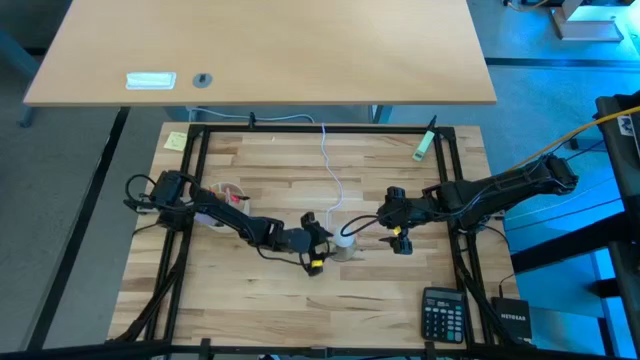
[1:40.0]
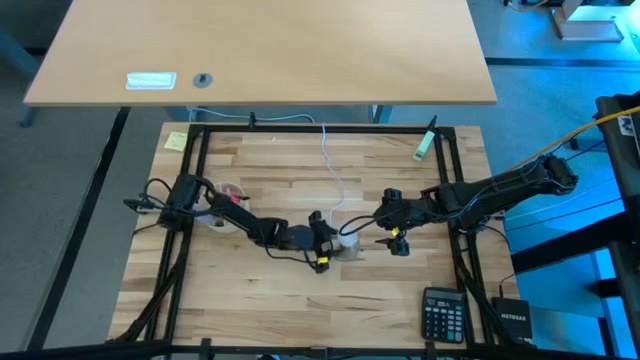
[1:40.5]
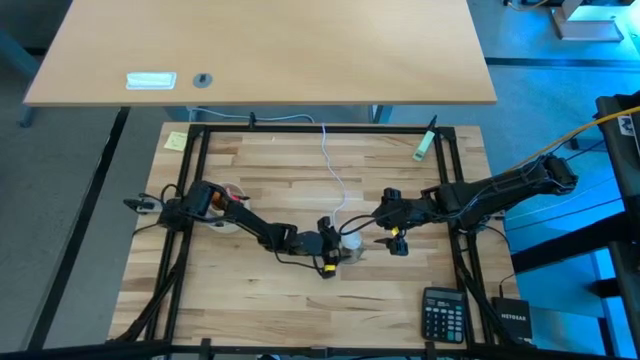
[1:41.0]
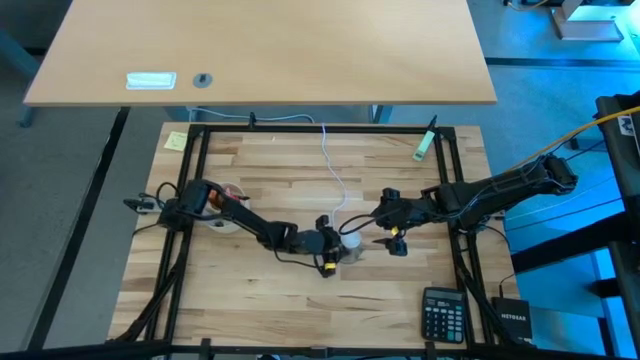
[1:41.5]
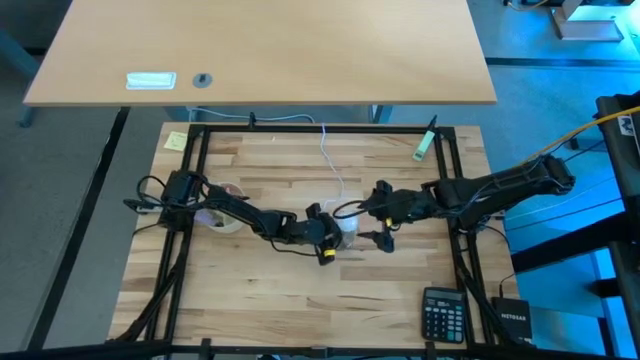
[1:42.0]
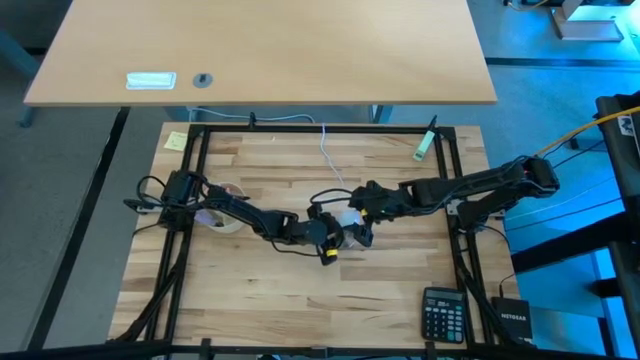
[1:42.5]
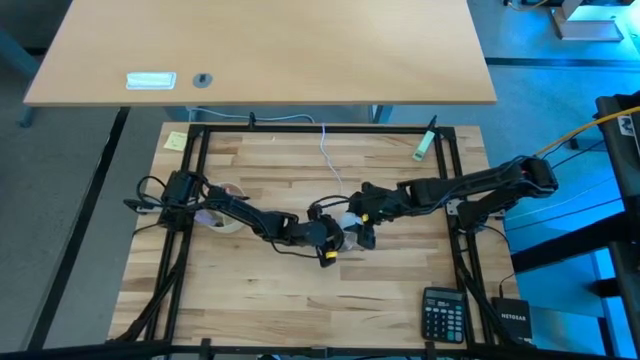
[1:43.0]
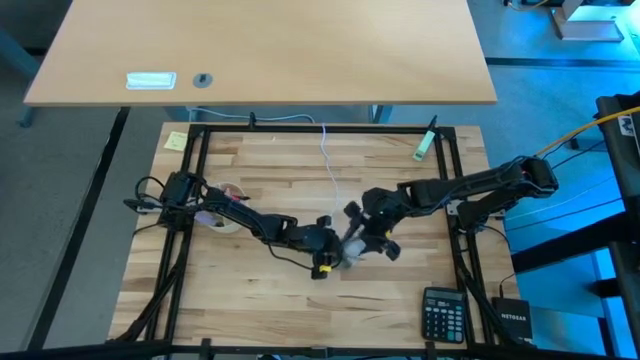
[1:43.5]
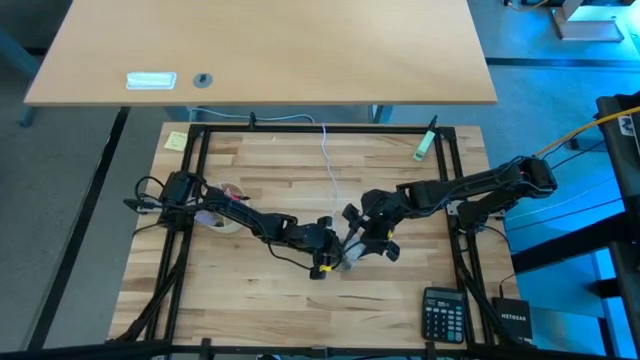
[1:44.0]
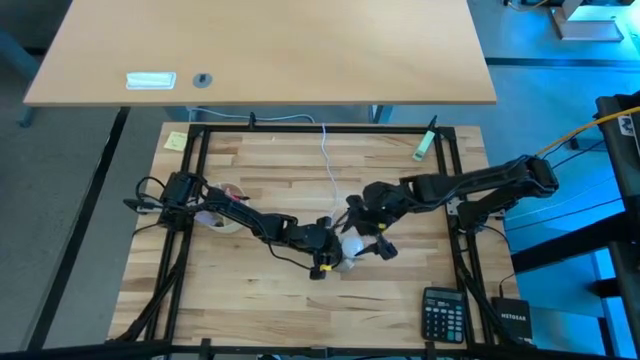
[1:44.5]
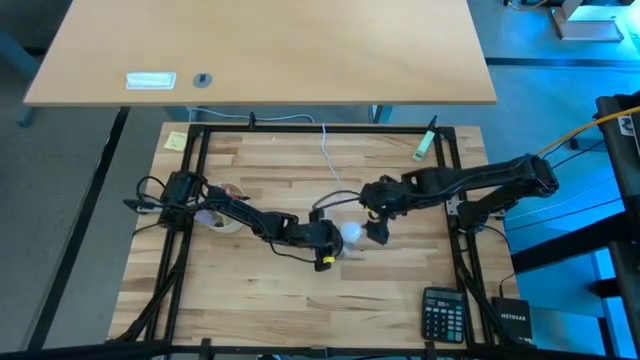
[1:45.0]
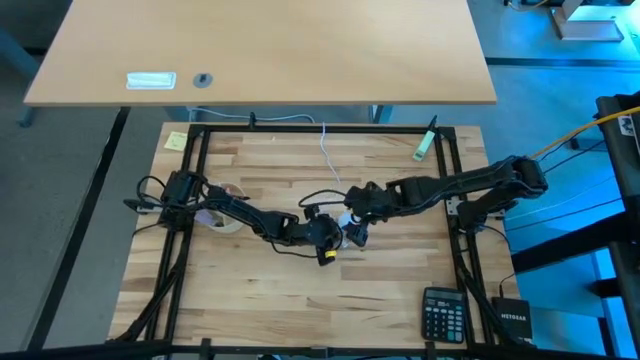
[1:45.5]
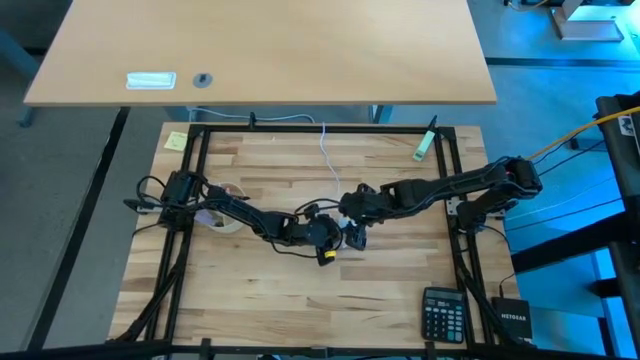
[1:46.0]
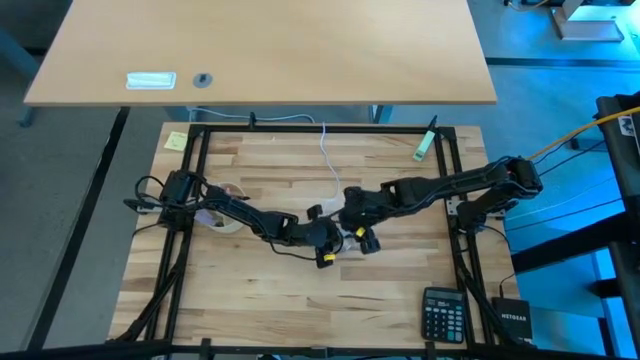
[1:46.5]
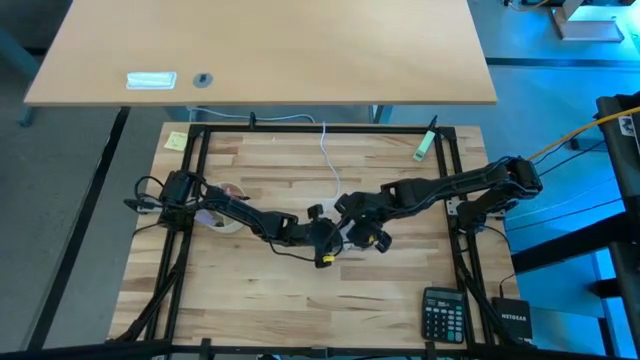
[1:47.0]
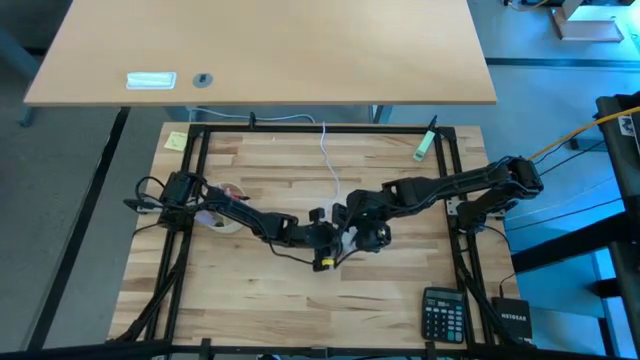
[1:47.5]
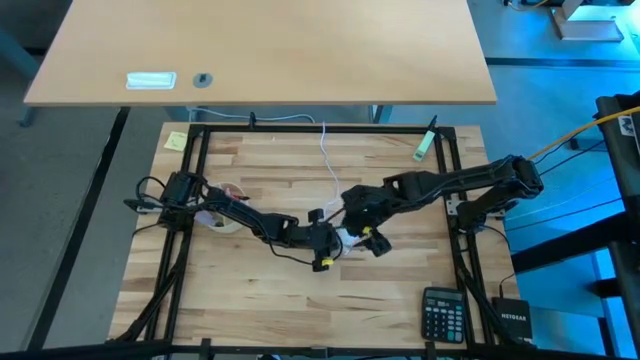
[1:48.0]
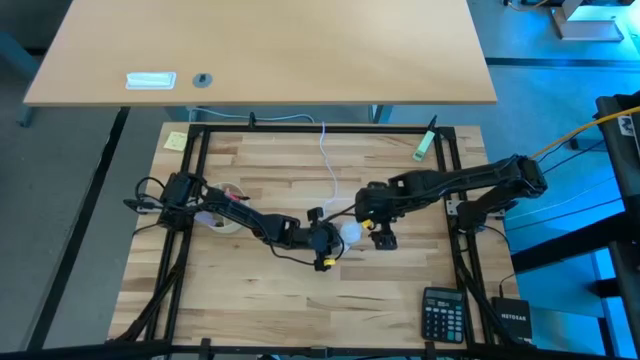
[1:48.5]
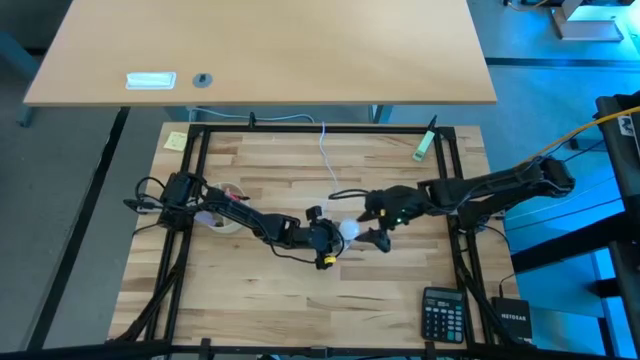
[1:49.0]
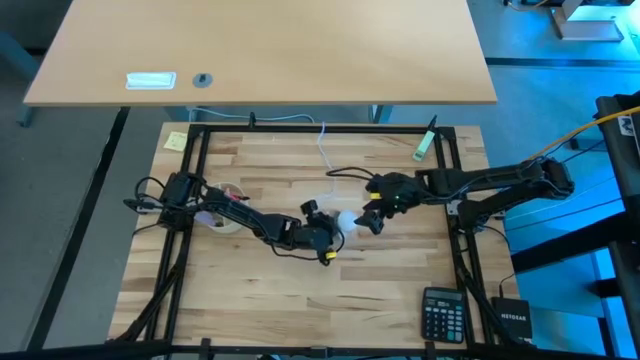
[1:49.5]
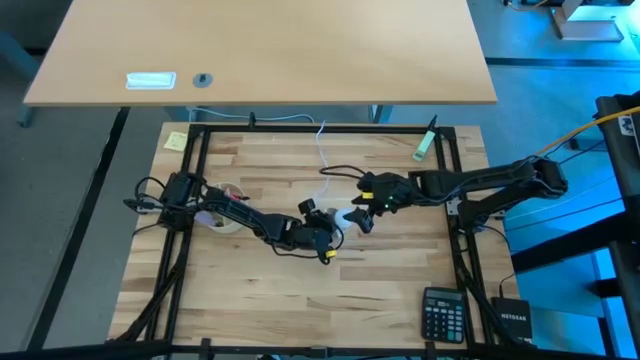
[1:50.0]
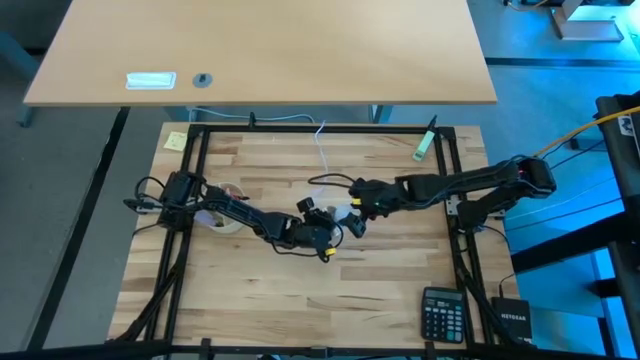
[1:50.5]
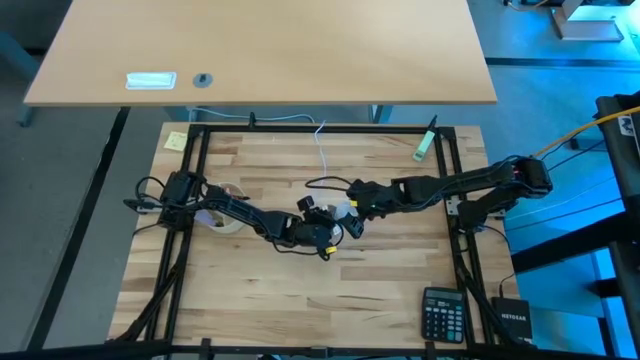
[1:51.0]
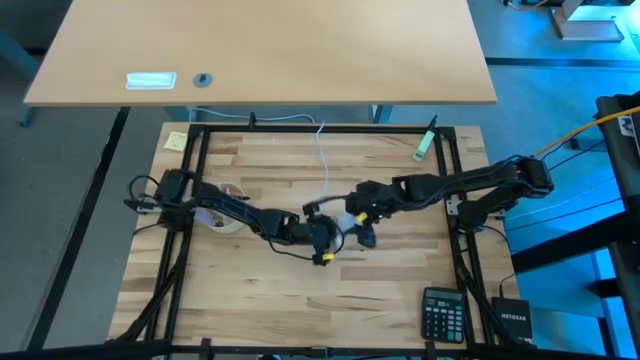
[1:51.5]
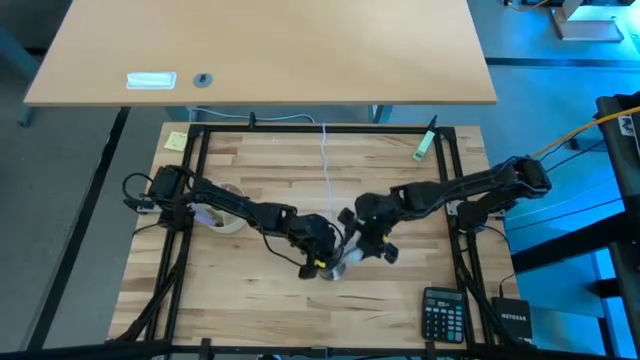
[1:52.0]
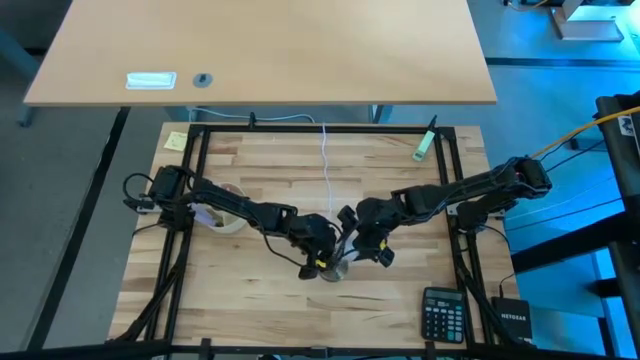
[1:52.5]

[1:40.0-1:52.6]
Task: Screw lightbulb
Remove the lightbulb from the lamp

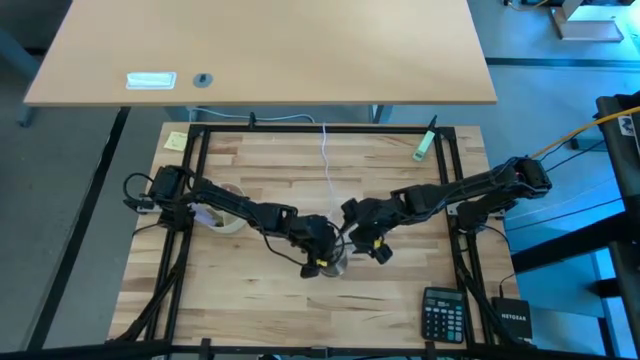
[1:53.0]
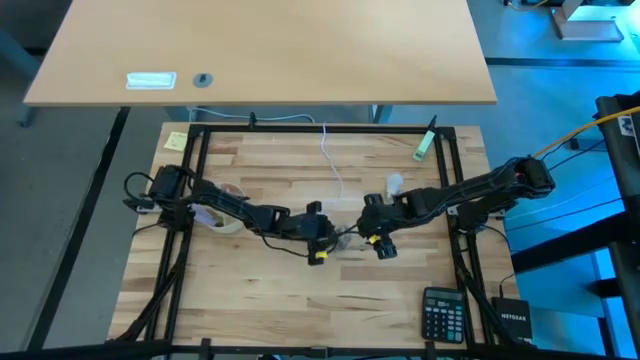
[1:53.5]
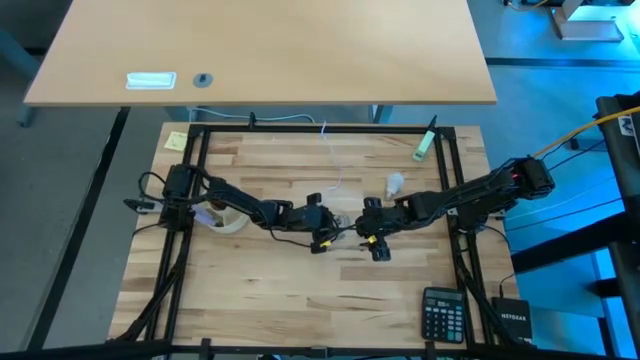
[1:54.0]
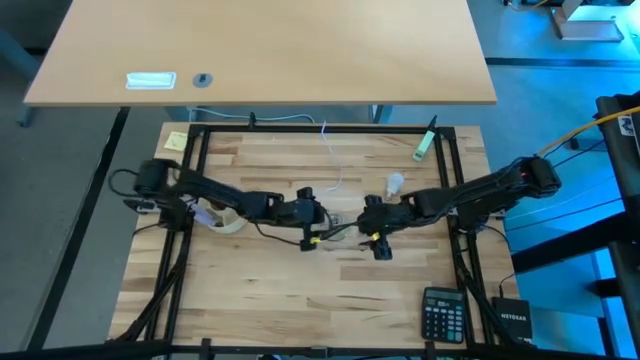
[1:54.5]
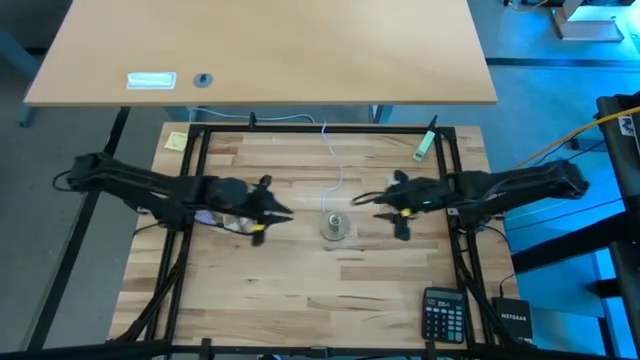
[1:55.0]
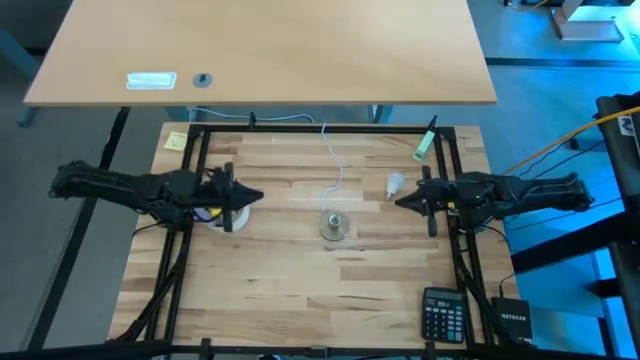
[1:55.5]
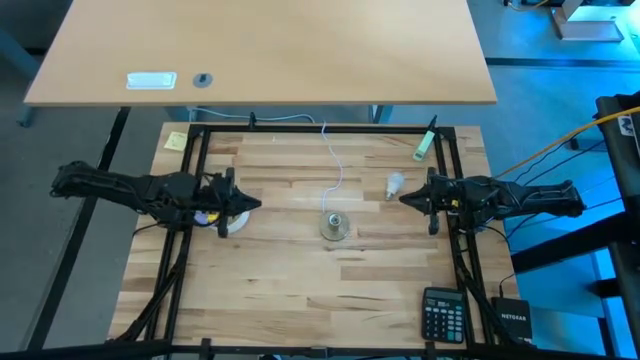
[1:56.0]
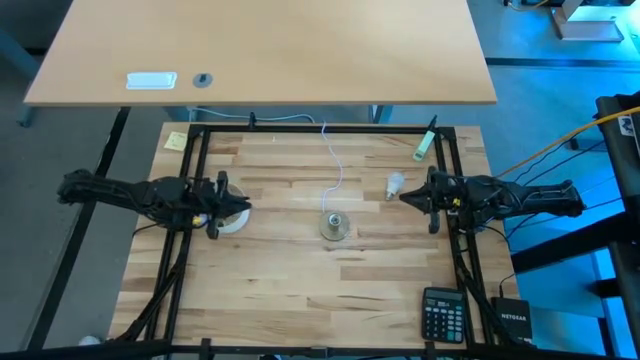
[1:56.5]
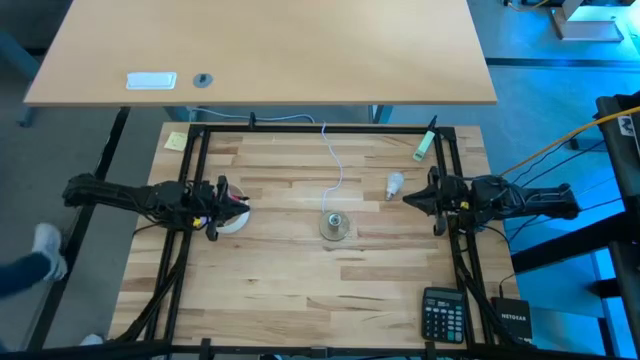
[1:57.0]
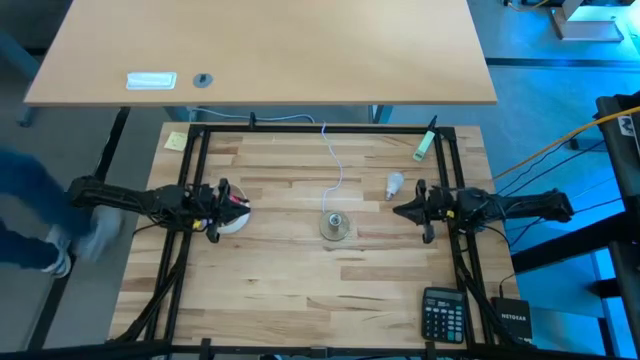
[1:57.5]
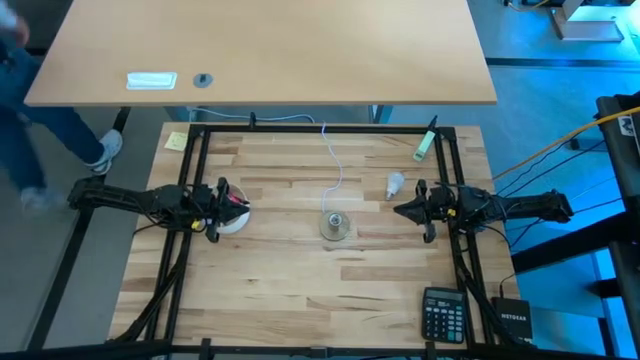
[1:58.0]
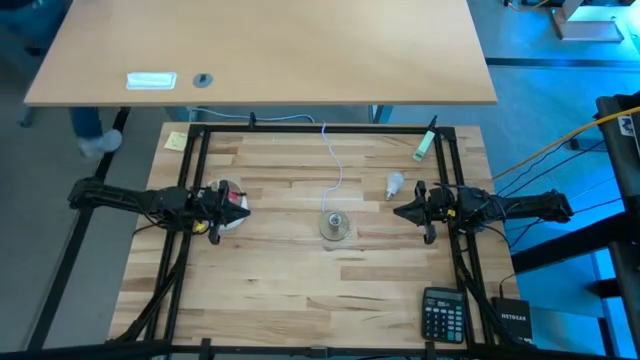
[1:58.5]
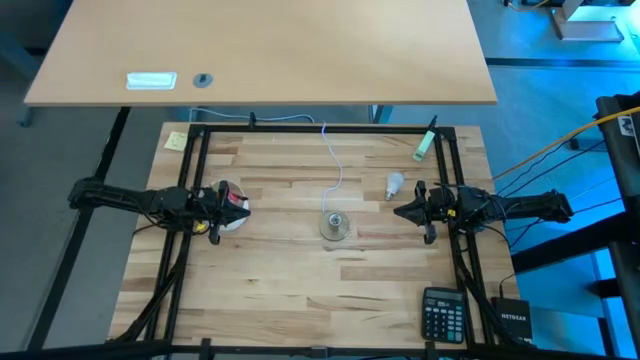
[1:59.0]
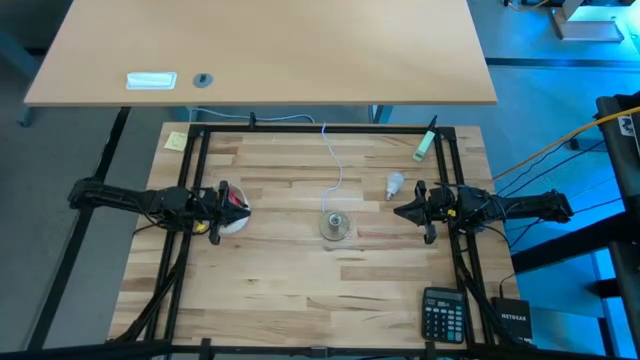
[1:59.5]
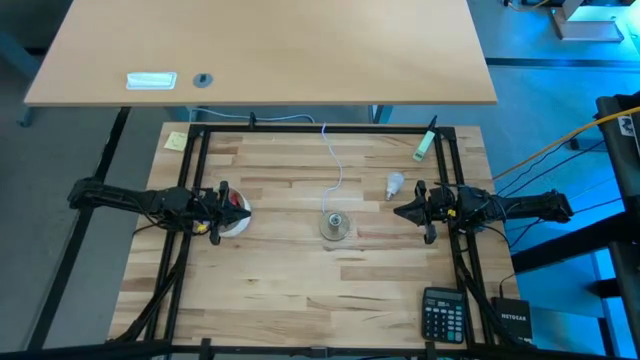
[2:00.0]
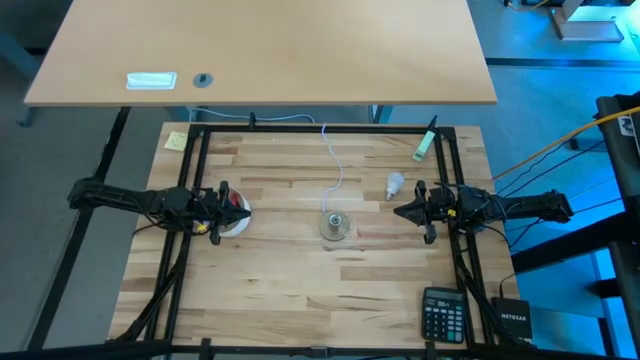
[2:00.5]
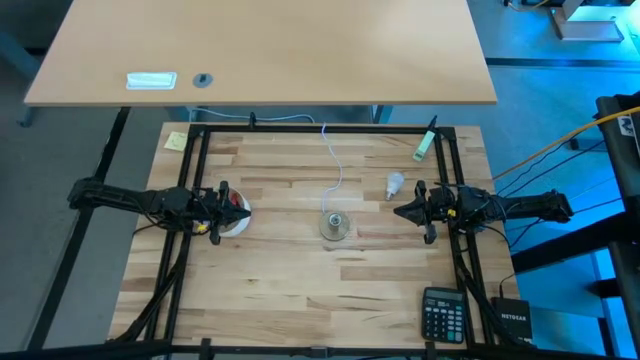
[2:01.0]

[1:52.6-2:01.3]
Return to Home Position
